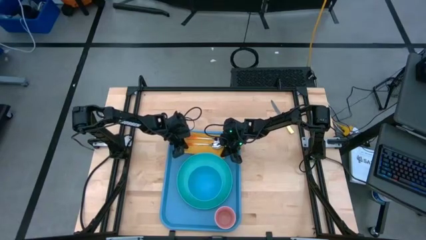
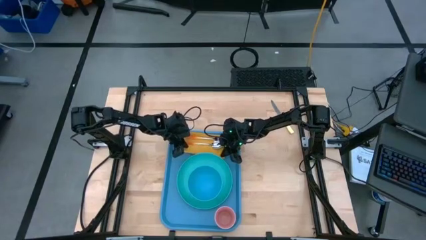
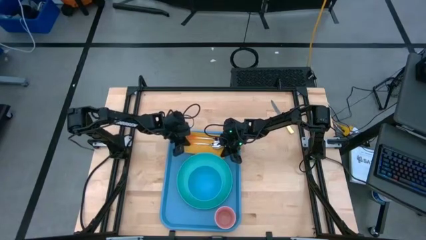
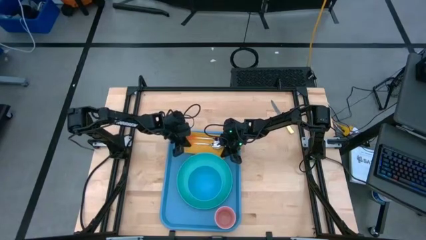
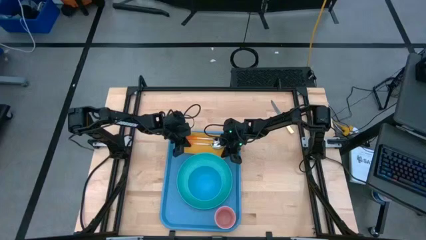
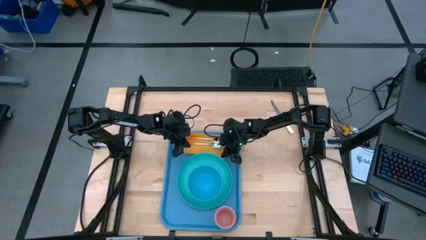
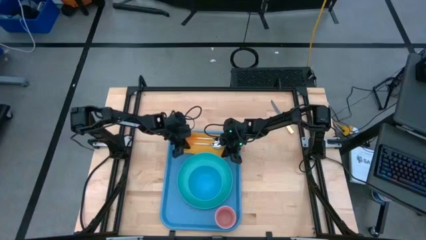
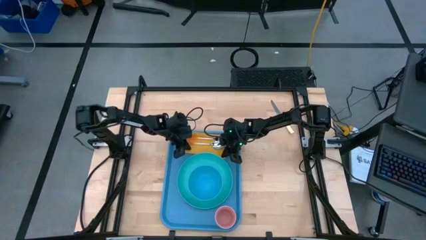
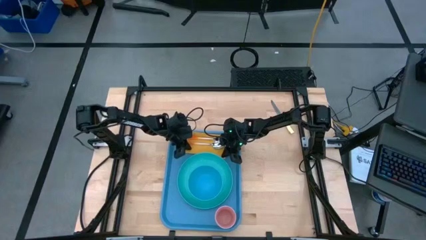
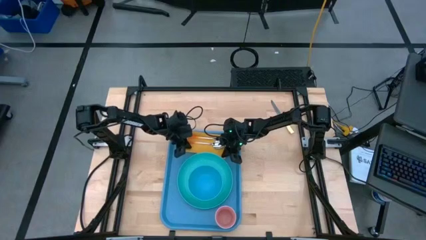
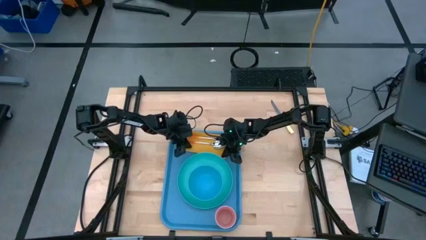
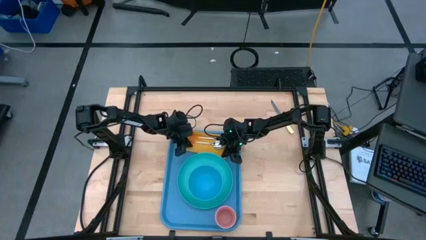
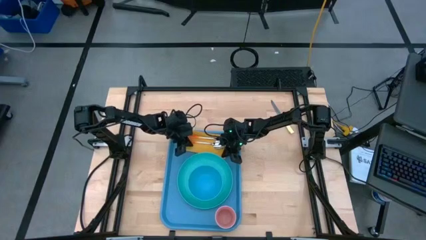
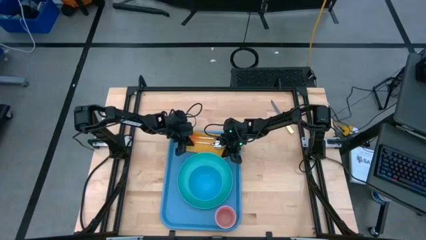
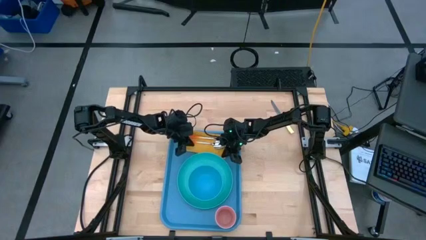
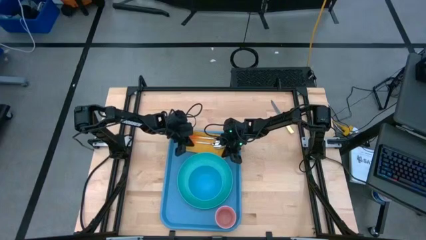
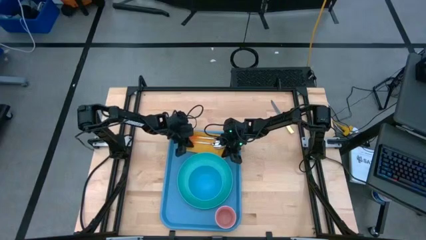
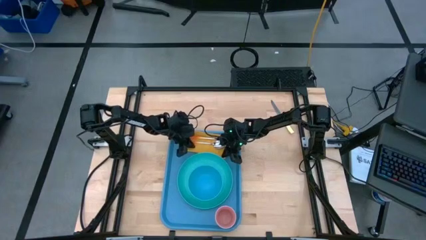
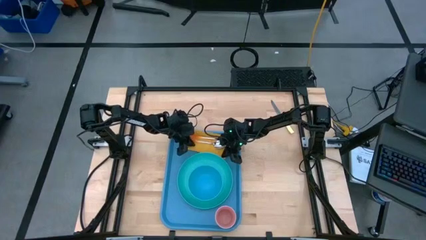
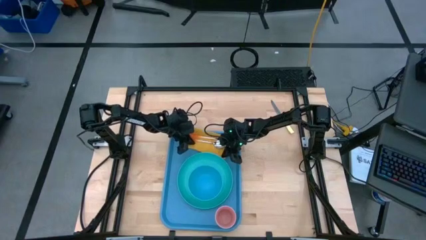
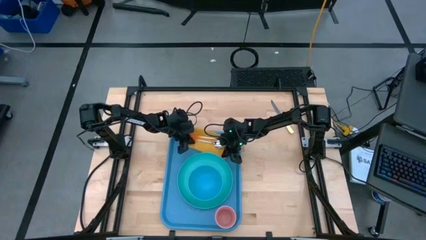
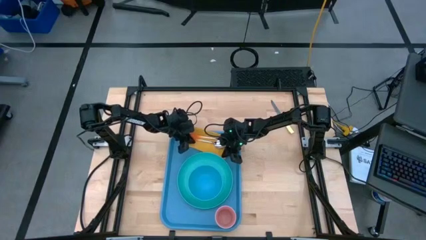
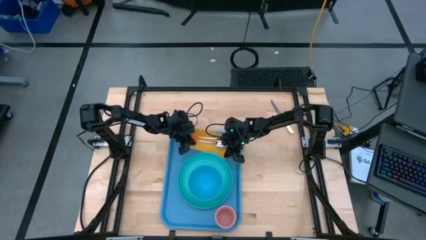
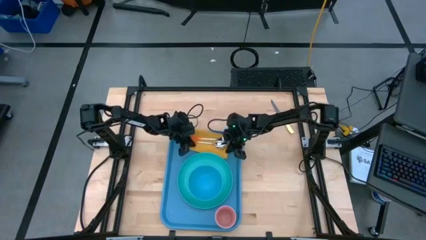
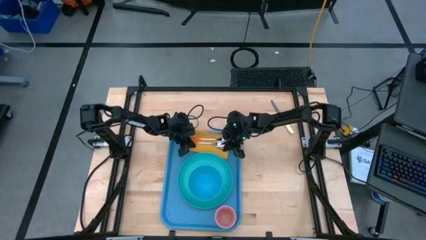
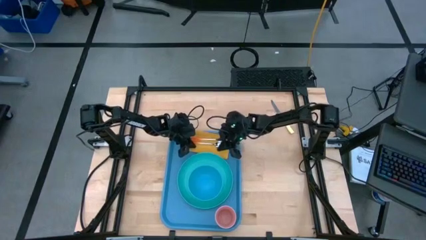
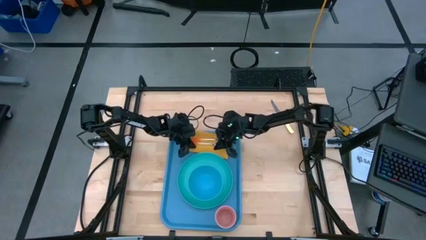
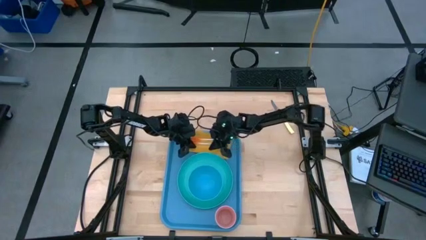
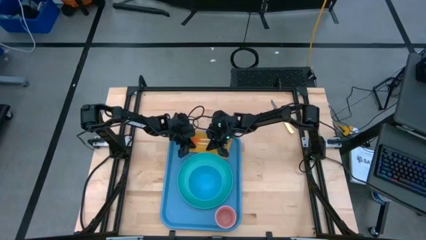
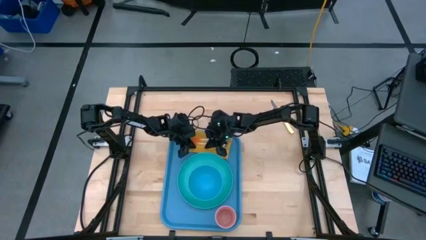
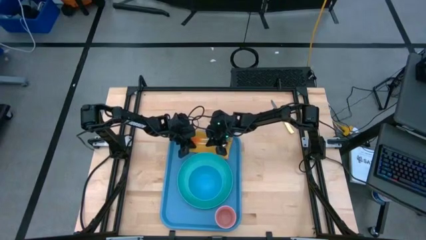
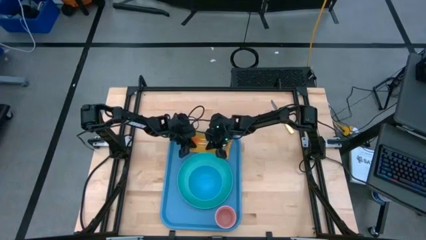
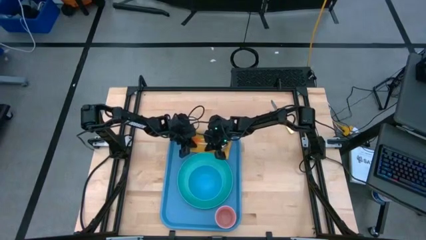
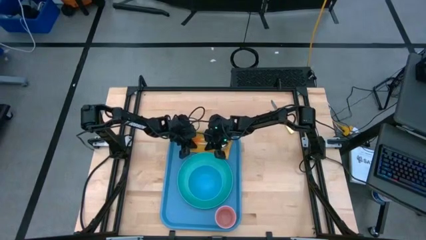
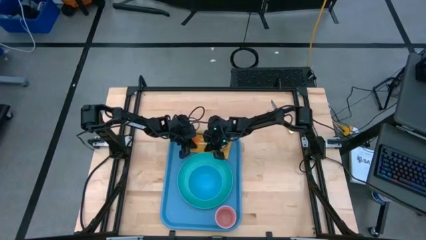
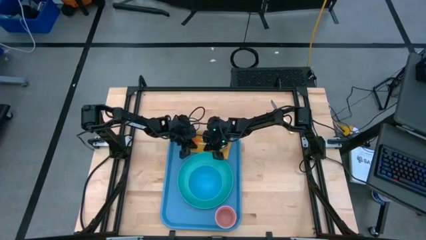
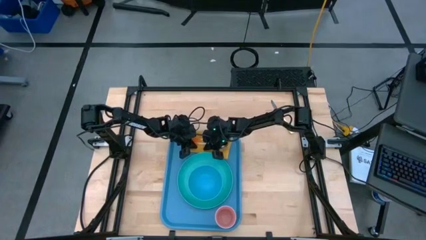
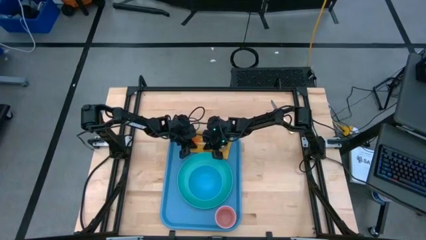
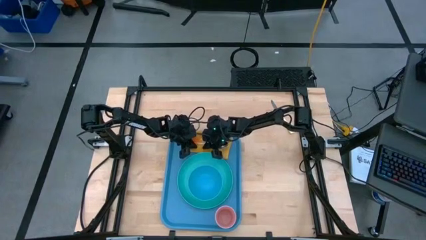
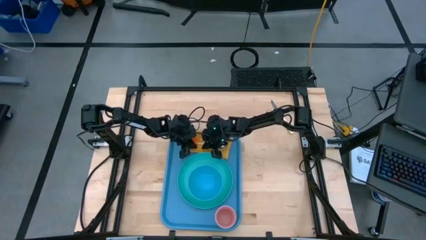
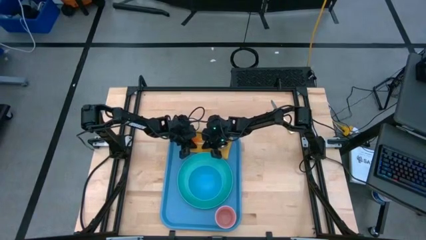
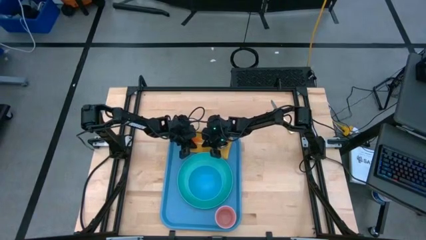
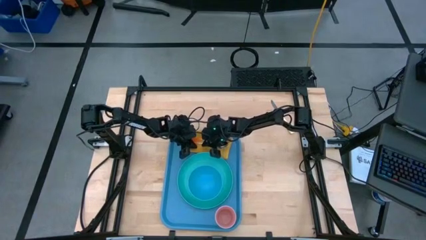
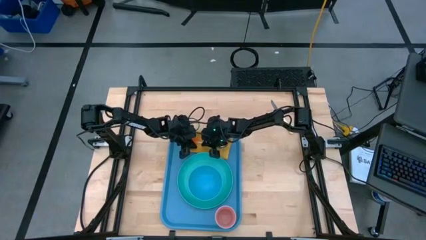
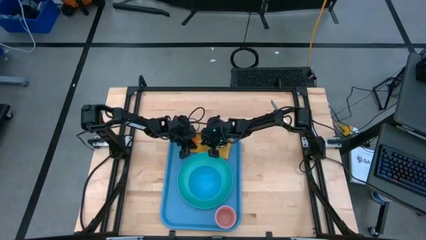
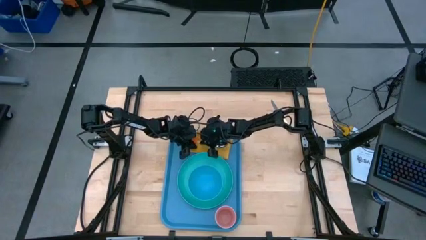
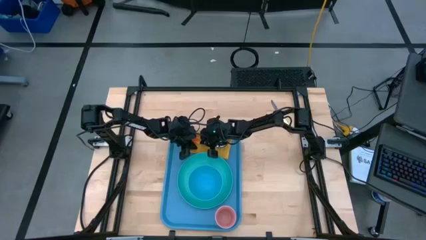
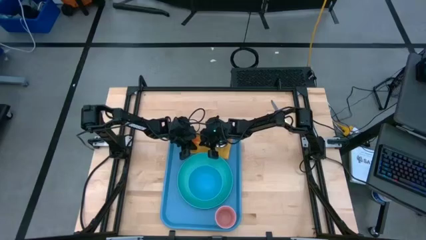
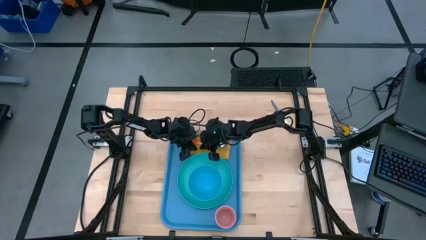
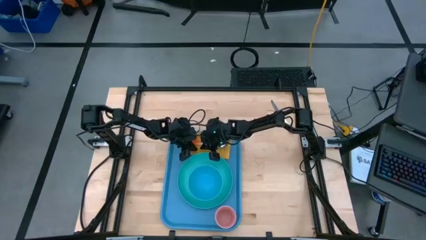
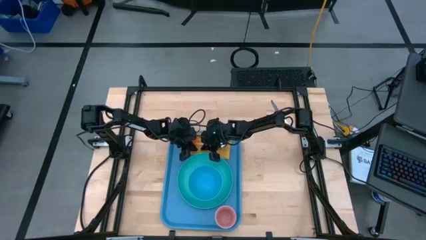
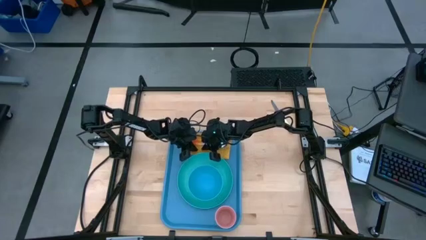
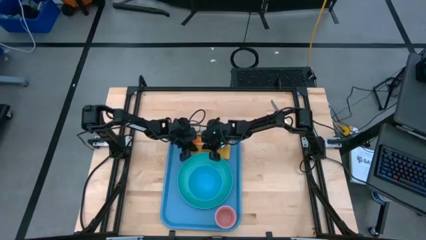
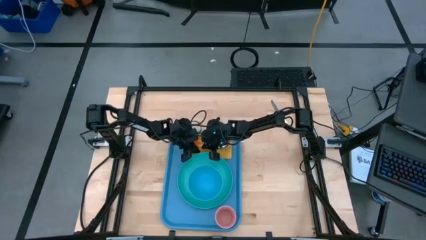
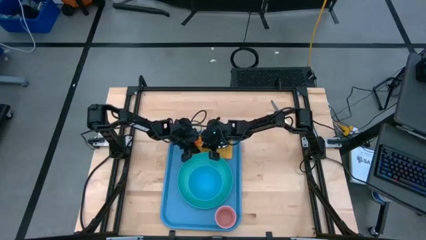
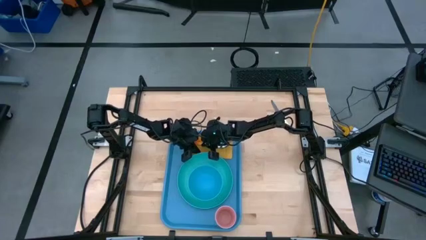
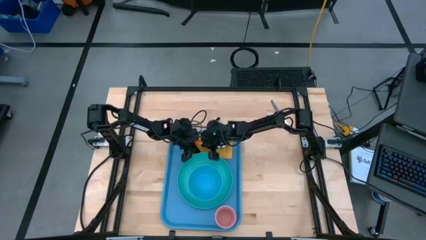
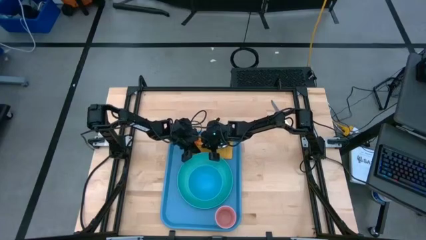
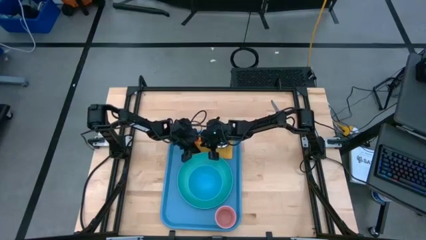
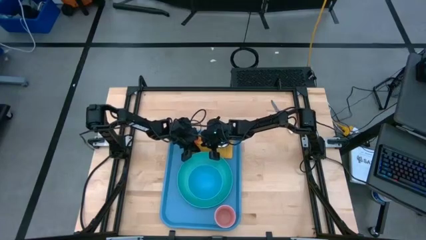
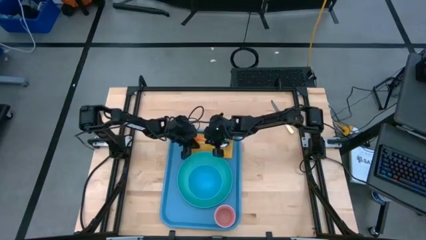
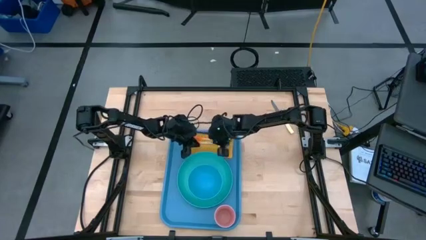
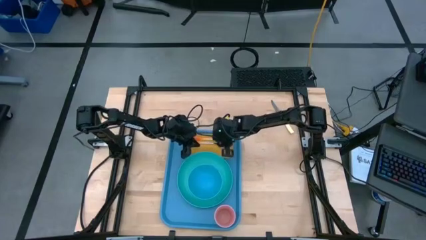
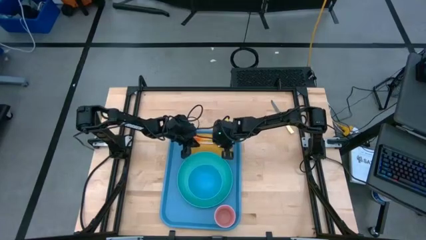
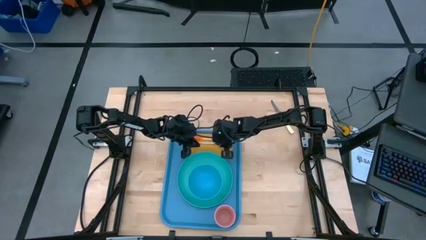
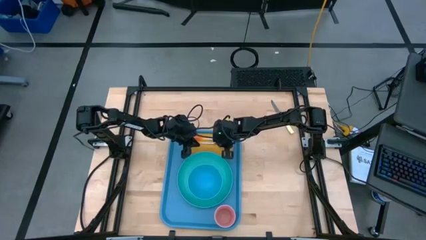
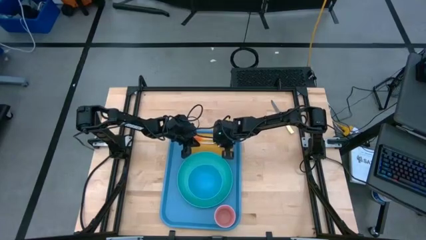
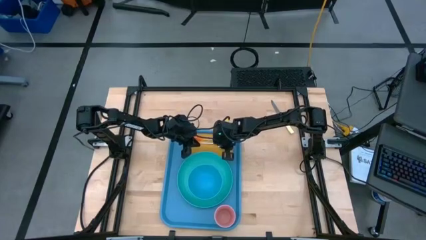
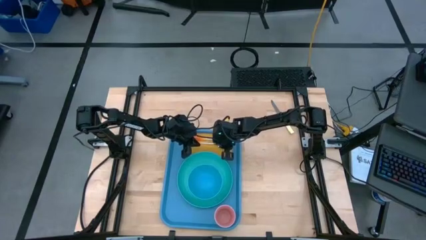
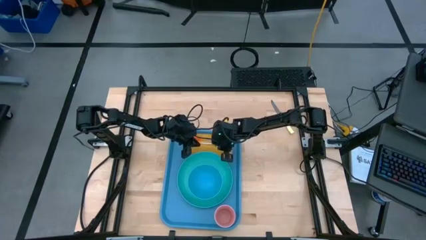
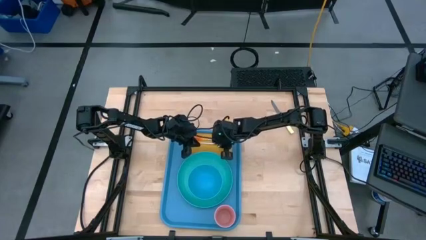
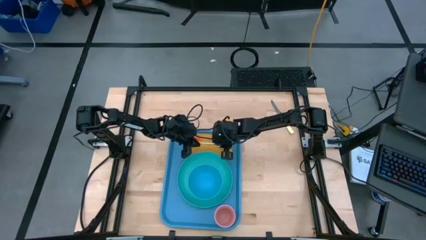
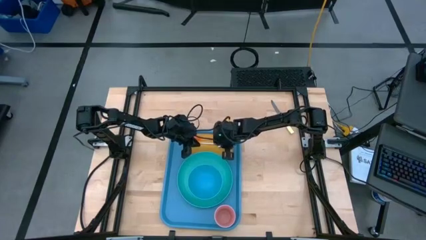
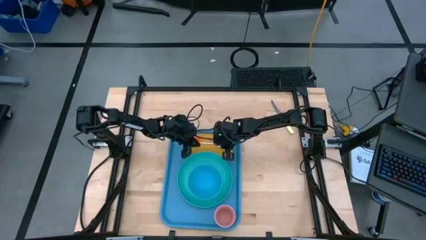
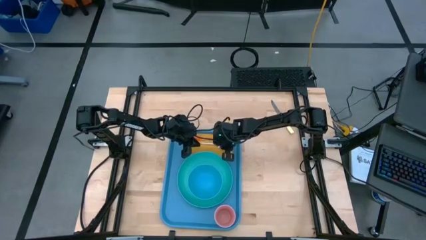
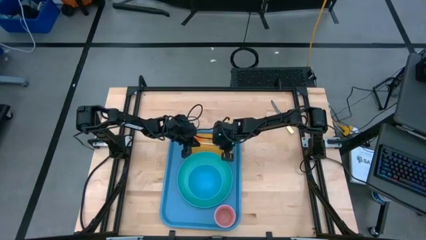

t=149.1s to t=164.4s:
Task: Set up tray
Adjust the orange napkin

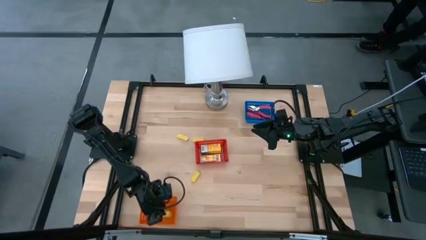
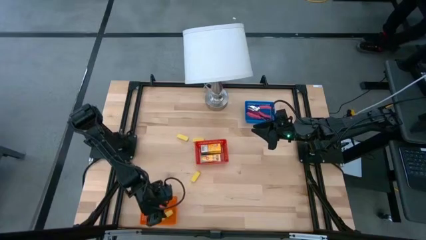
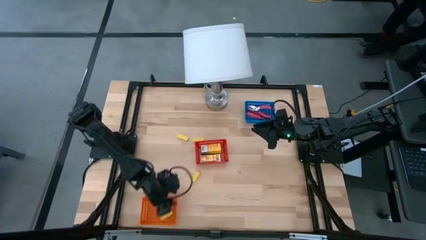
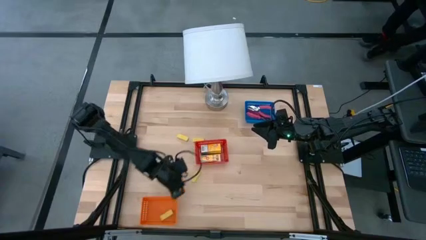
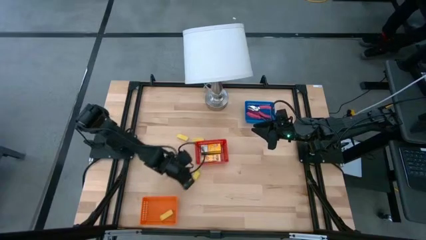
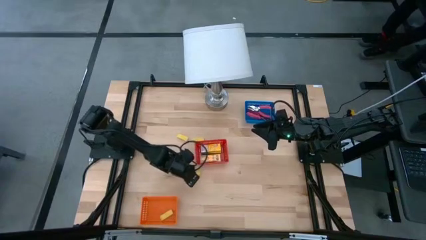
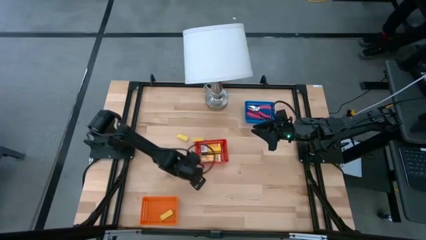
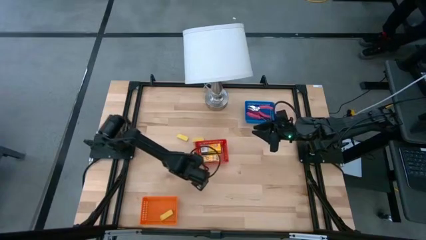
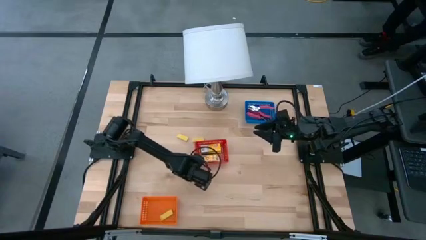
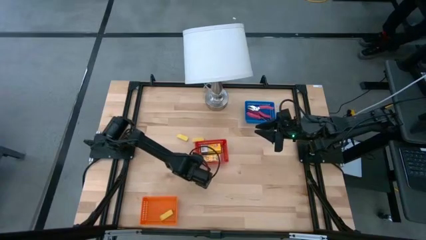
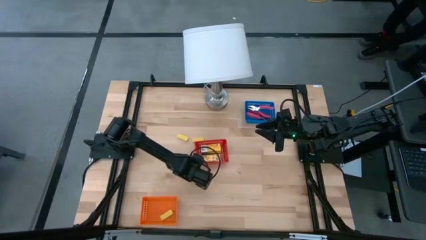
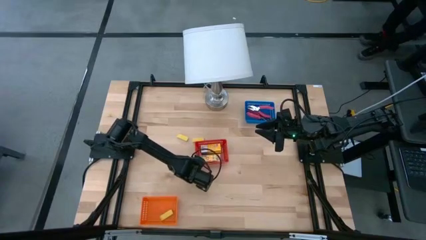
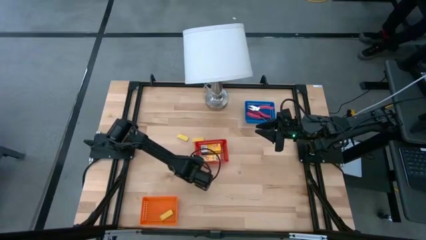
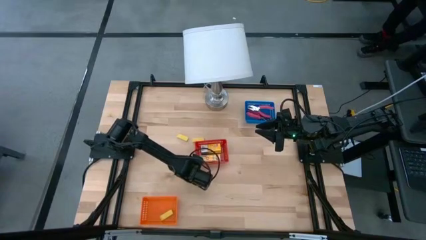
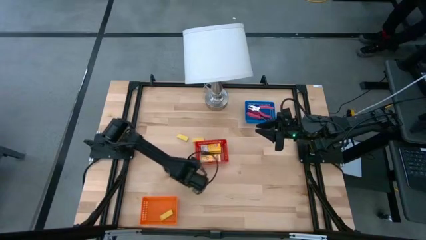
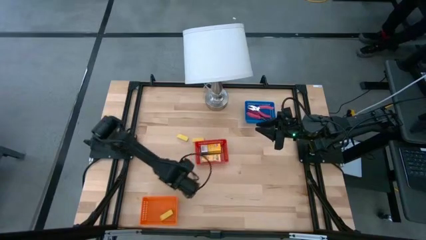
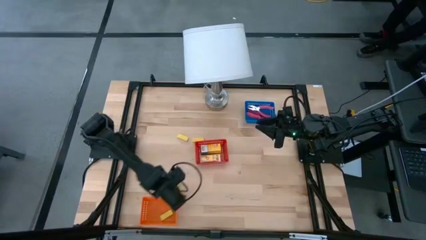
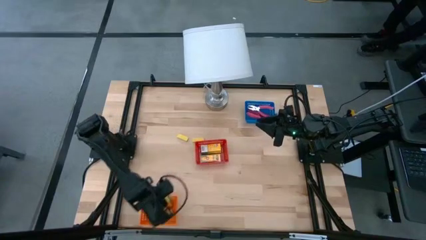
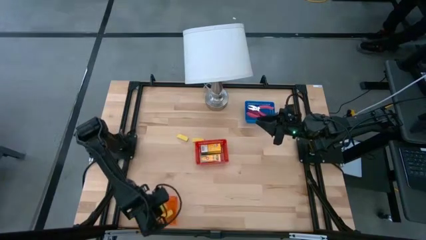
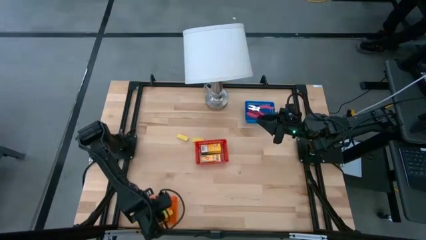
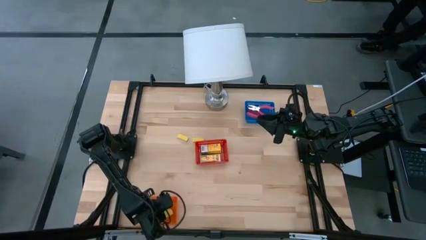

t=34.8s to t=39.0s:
Task: Pick & Place School Supplies
Put the yellow eraser into the orange bin
